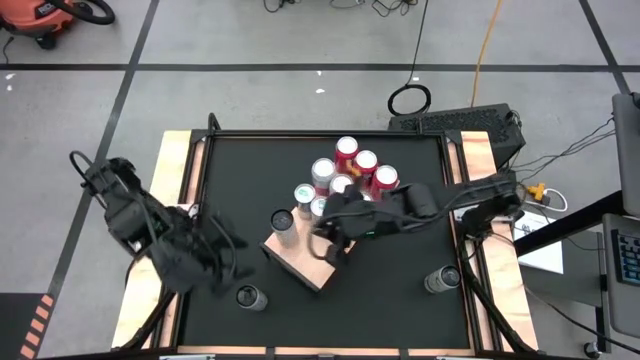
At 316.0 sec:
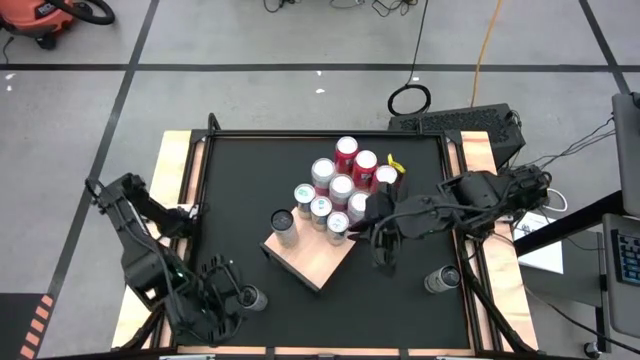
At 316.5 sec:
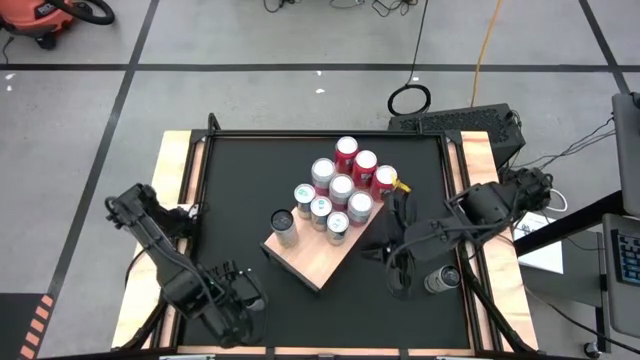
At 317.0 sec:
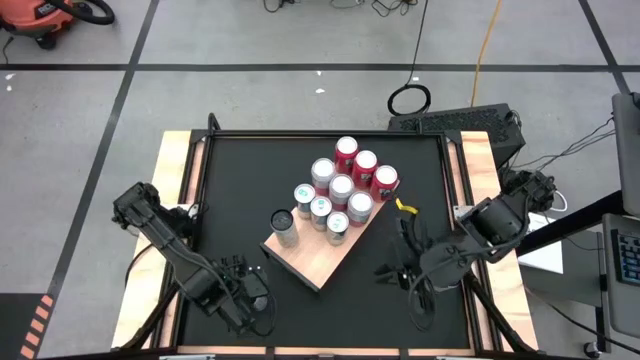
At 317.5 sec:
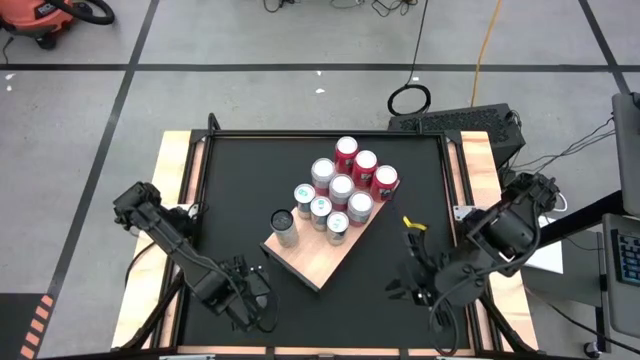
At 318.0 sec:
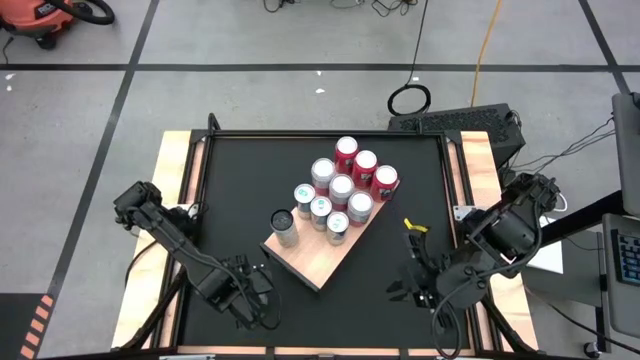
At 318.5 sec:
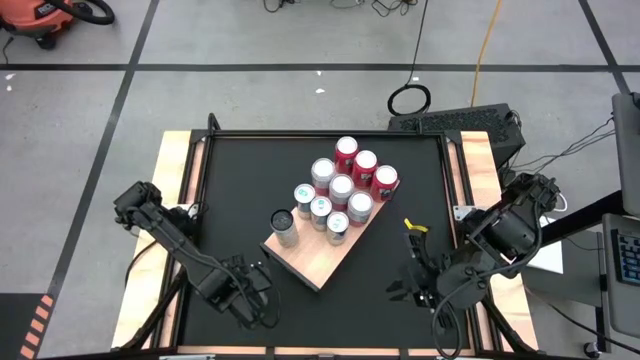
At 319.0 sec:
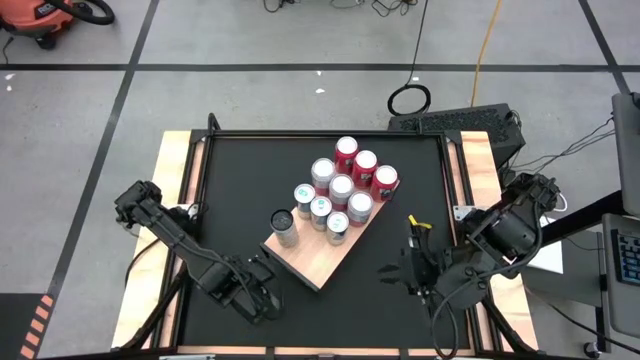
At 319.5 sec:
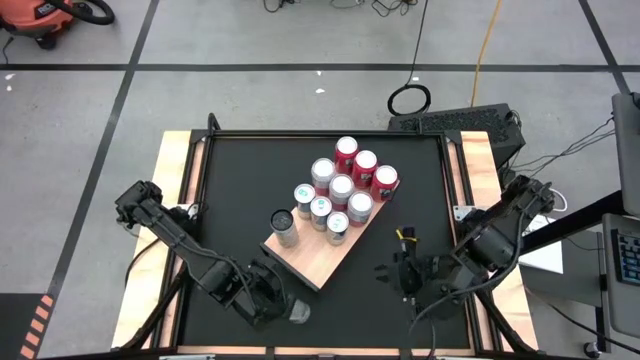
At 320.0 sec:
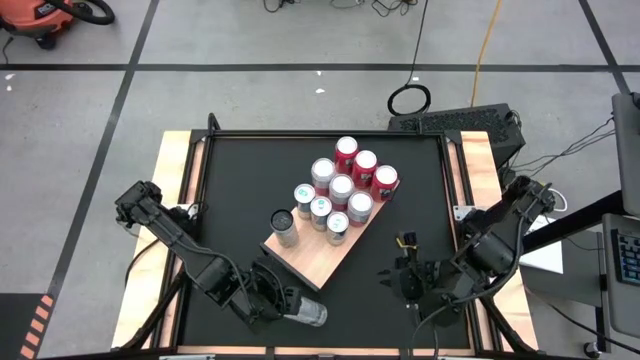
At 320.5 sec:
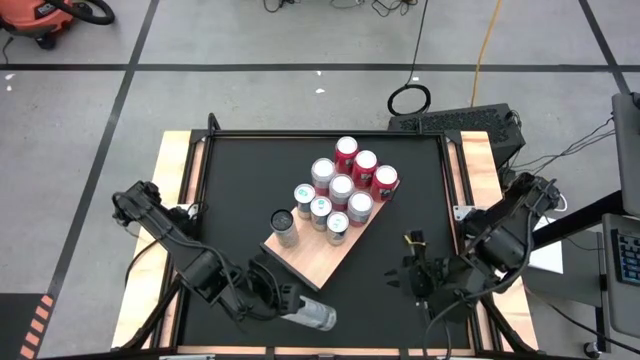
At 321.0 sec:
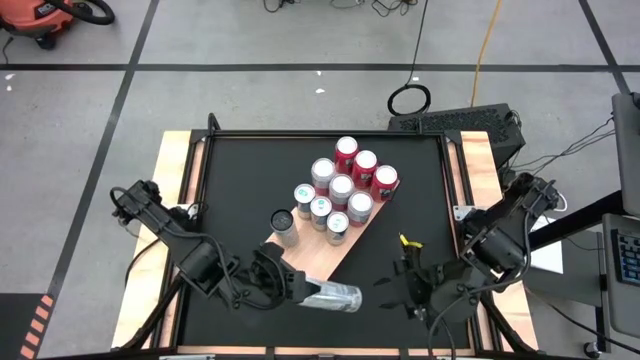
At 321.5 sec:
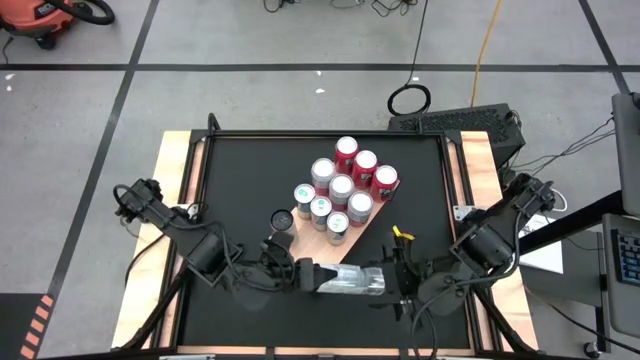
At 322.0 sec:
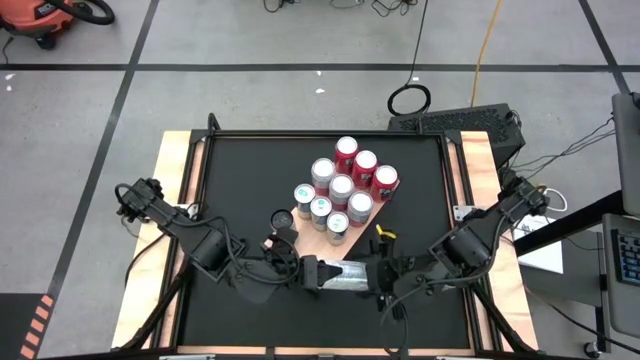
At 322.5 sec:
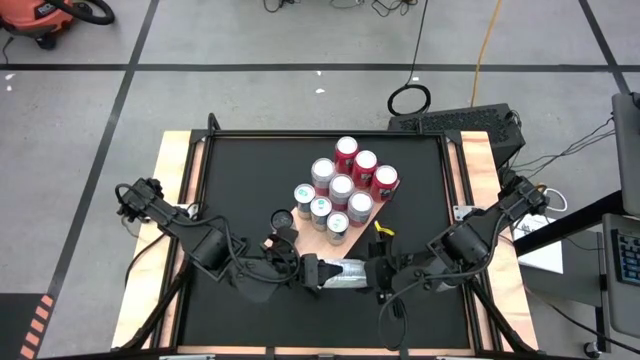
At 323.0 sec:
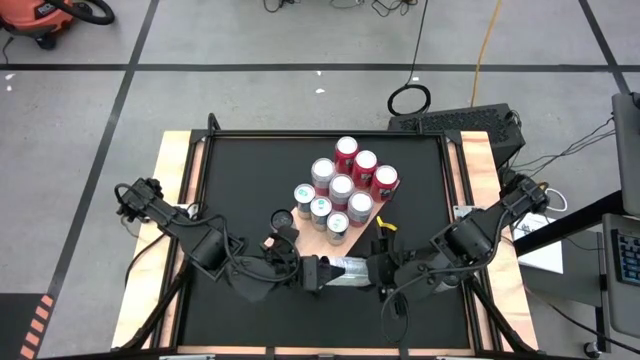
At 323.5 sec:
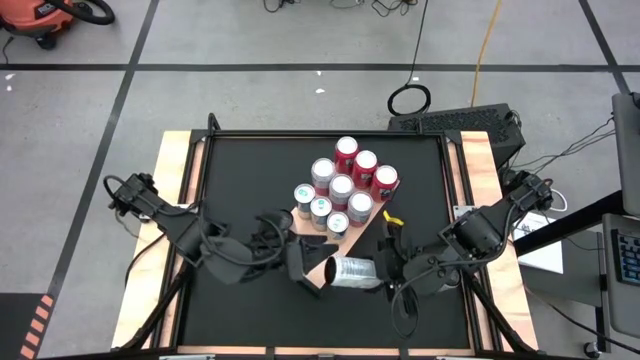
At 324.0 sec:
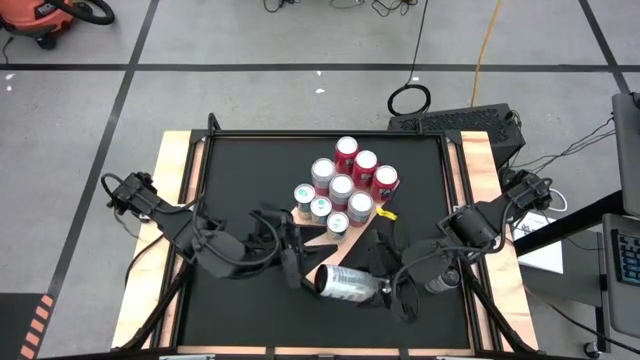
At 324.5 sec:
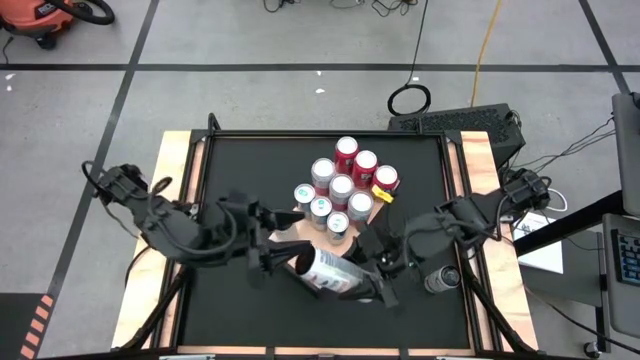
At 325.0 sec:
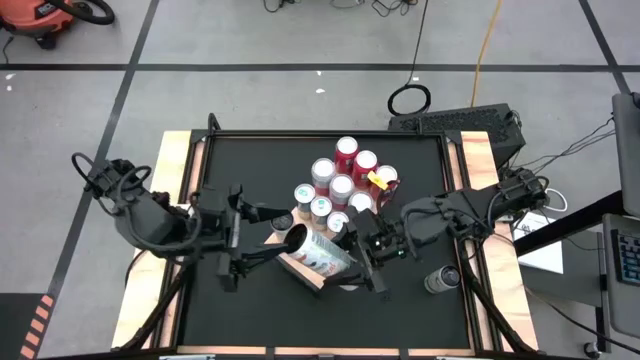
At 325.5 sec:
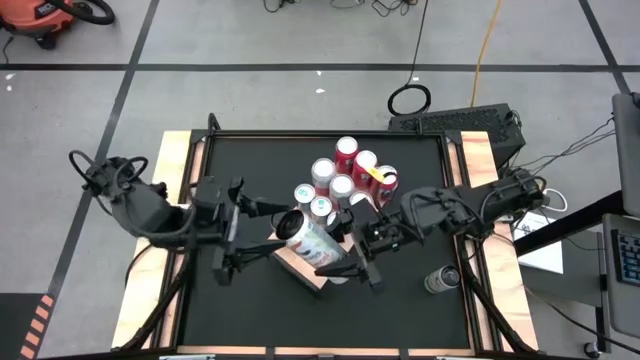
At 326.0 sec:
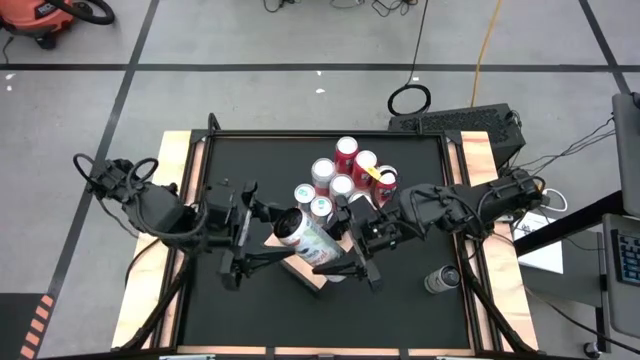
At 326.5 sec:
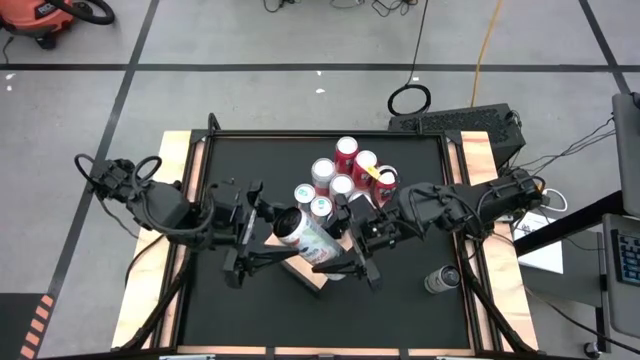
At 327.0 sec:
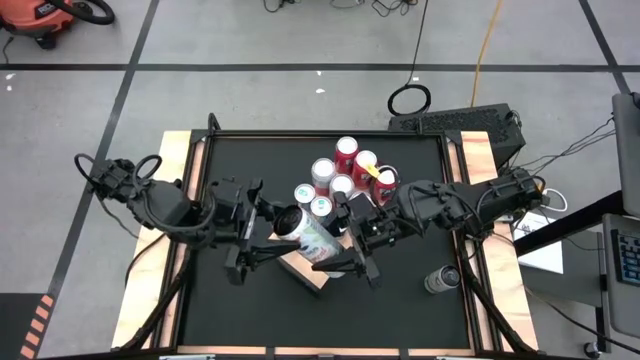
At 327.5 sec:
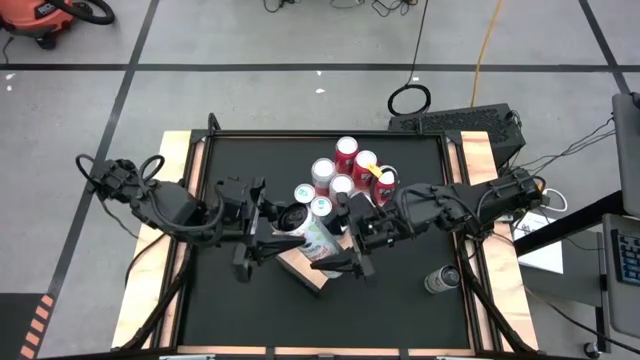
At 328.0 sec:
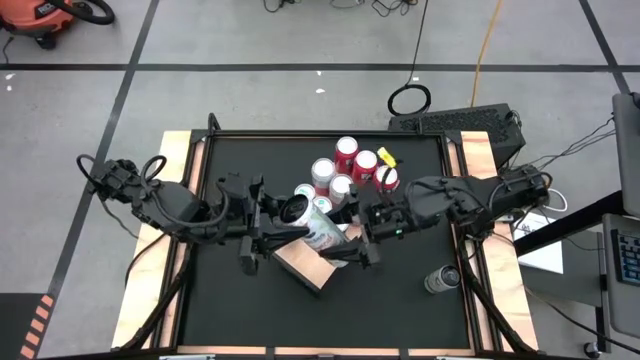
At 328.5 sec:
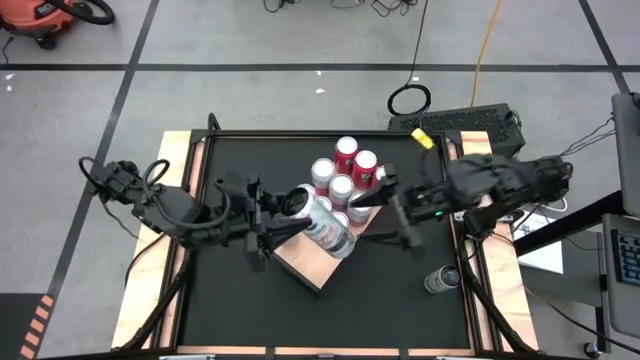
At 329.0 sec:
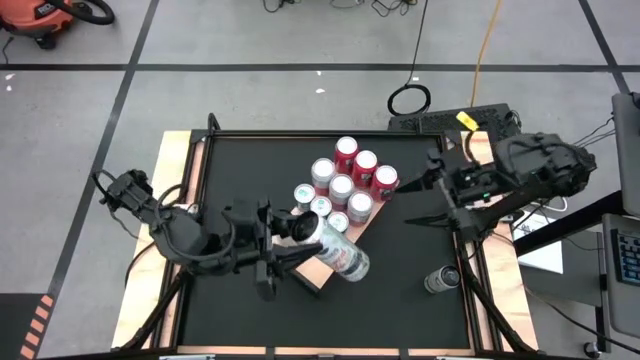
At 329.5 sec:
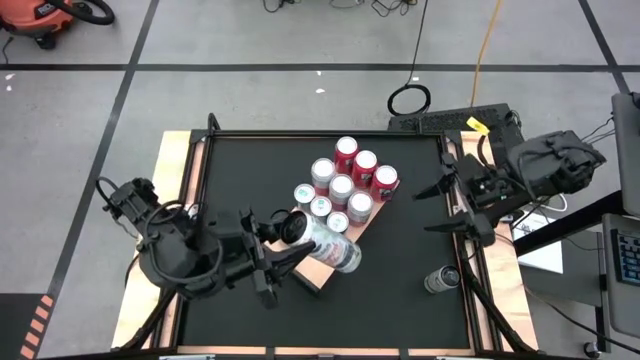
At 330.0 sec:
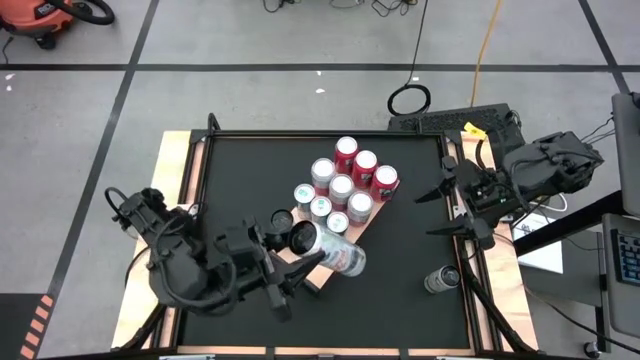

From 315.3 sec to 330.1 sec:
Task: Place canned beverage on shelf
Put the bottom white-yellow soda can on the shelf aligned with the white-yellow soda can

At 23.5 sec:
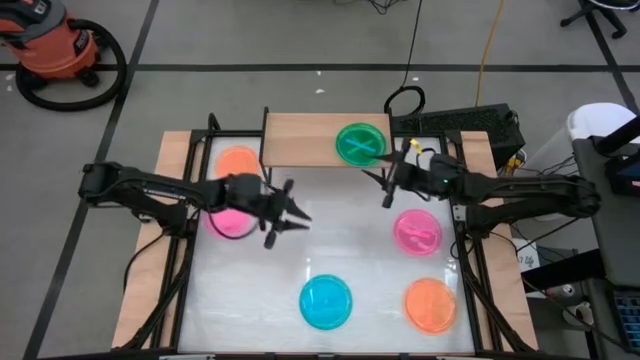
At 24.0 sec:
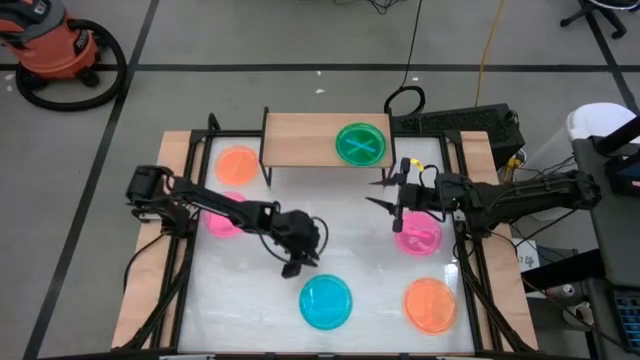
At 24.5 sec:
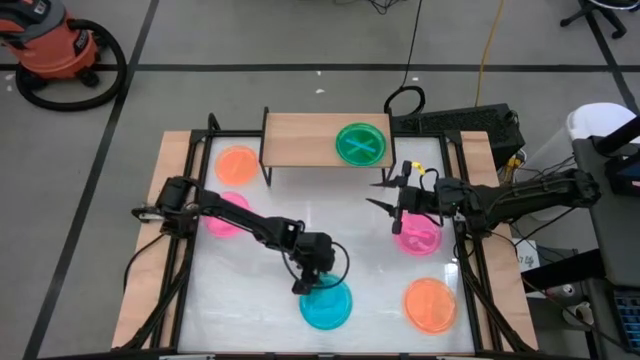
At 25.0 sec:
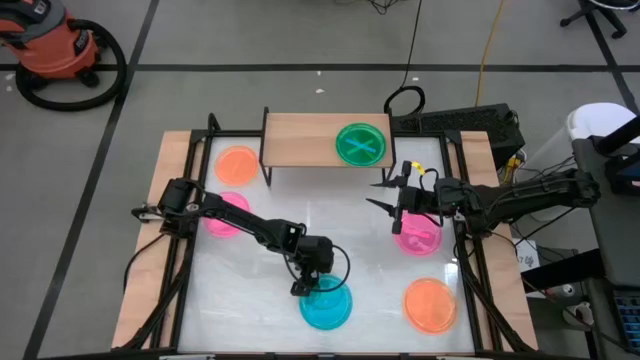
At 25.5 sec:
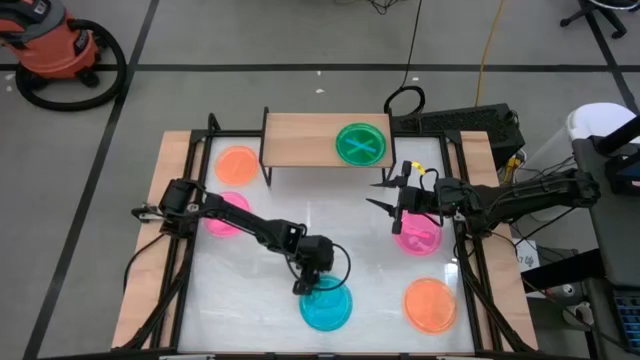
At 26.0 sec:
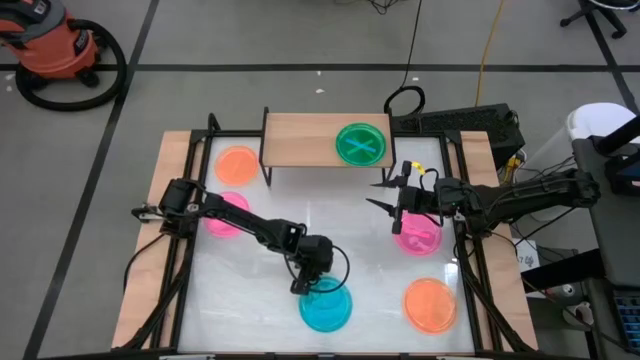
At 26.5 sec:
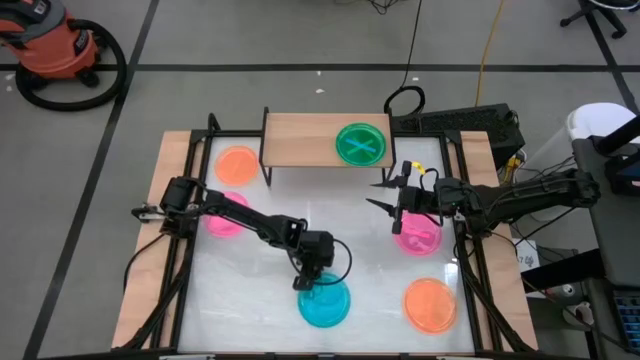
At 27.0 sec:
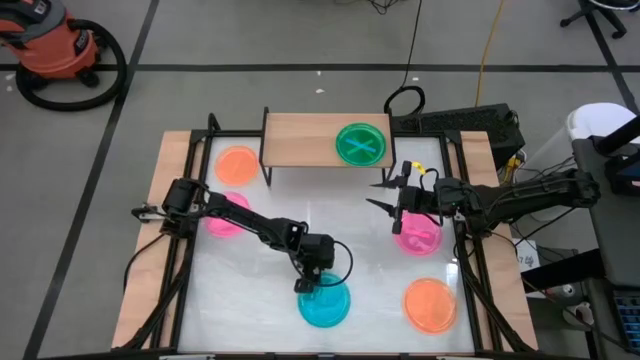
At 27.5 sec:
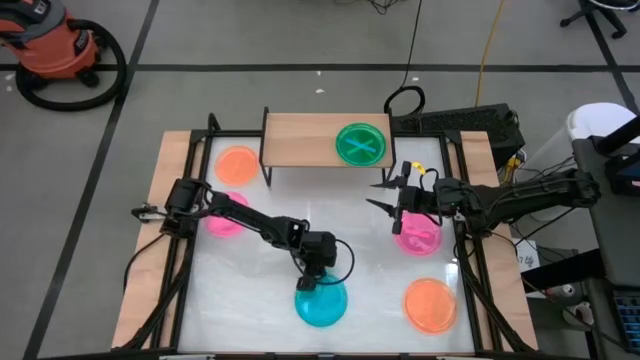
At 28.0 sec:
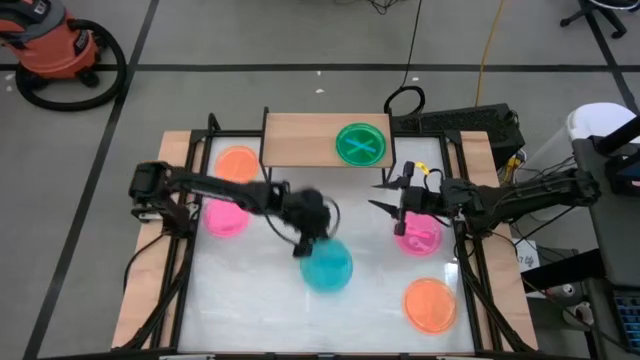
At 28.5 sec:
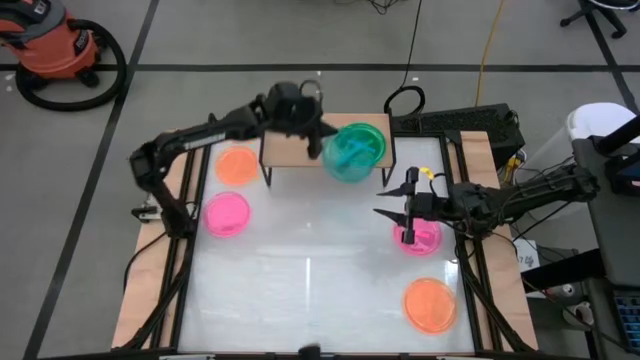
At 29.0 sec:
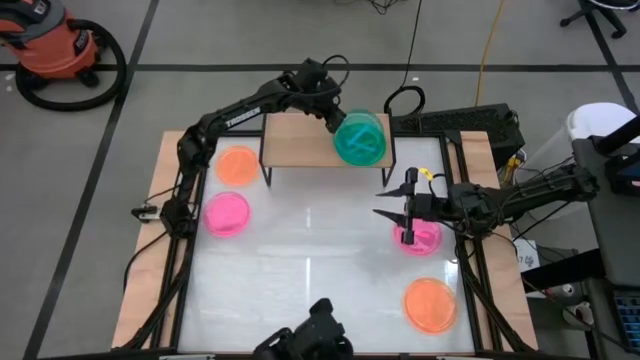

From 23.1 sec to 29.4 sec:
Task: Place and stack plates onto a shelf
Stack the blue plate on top of the other blue plate on the shelf
